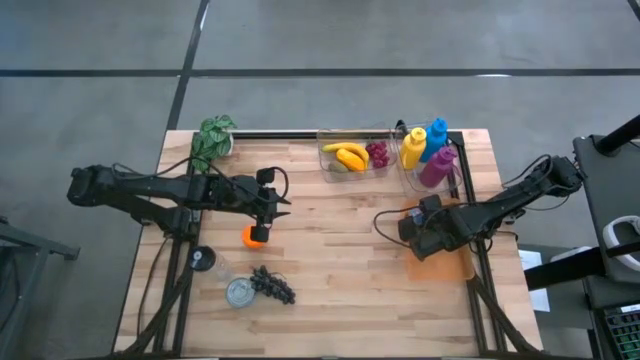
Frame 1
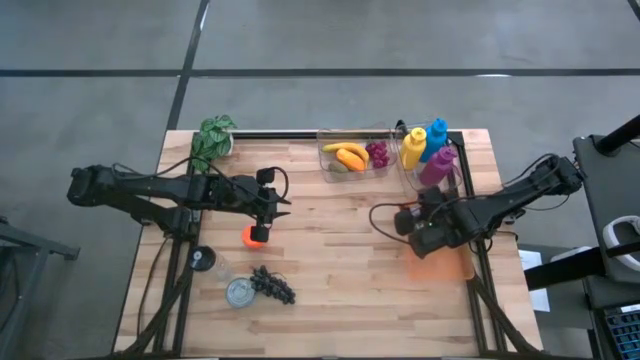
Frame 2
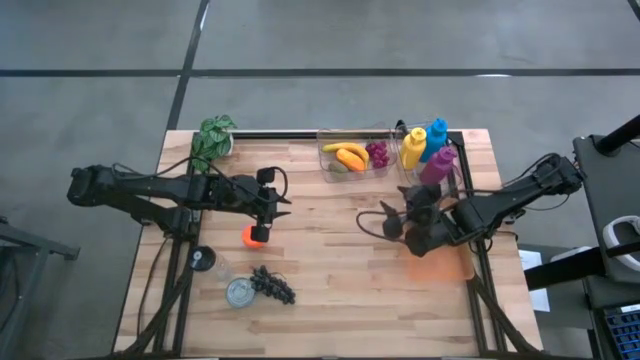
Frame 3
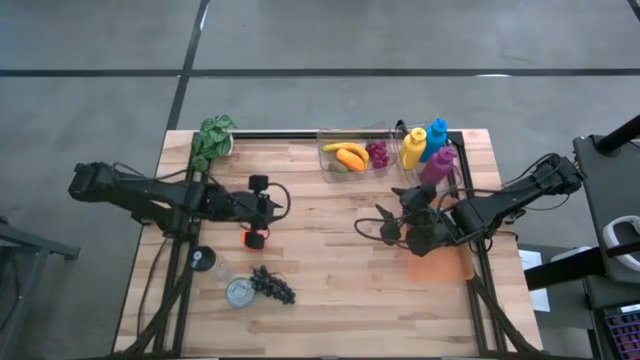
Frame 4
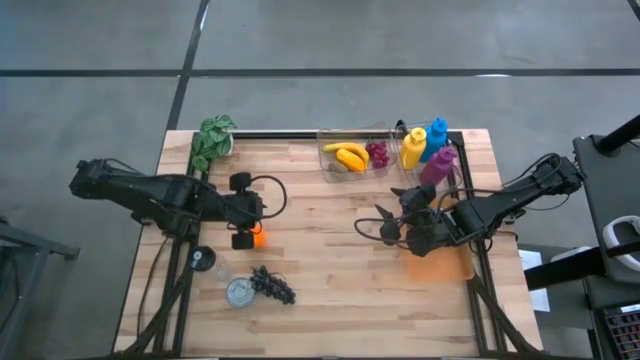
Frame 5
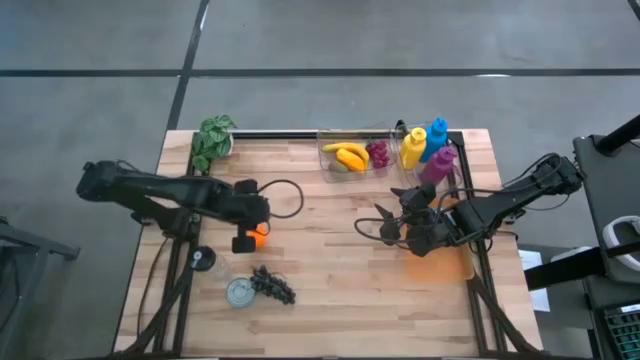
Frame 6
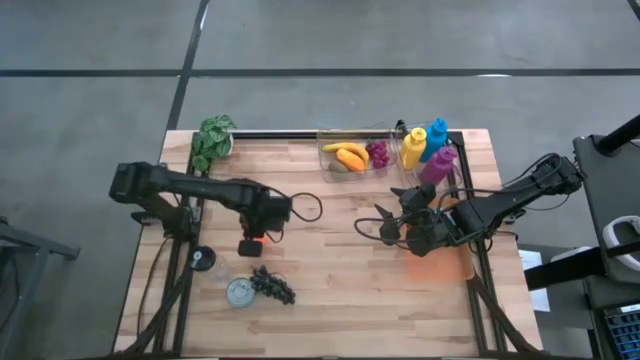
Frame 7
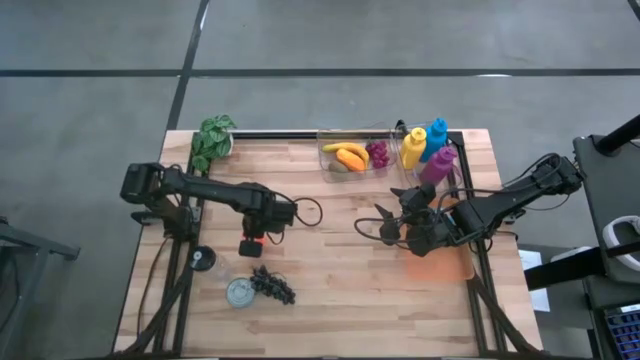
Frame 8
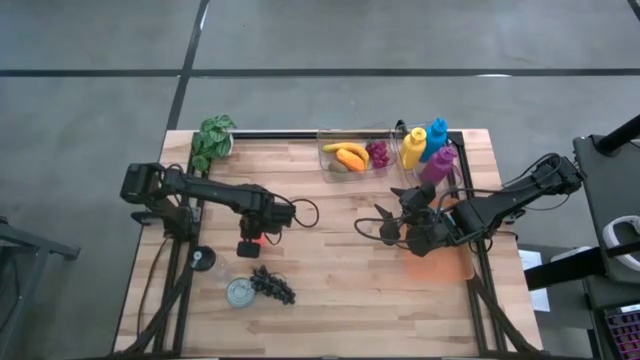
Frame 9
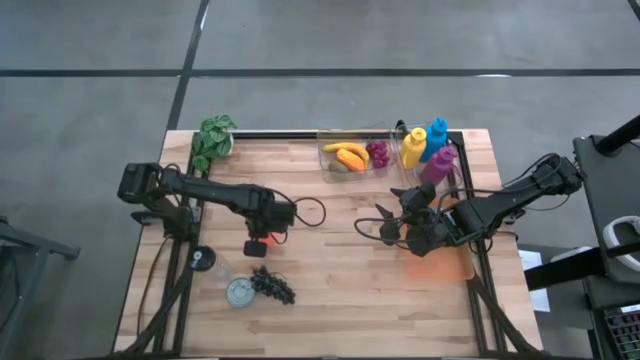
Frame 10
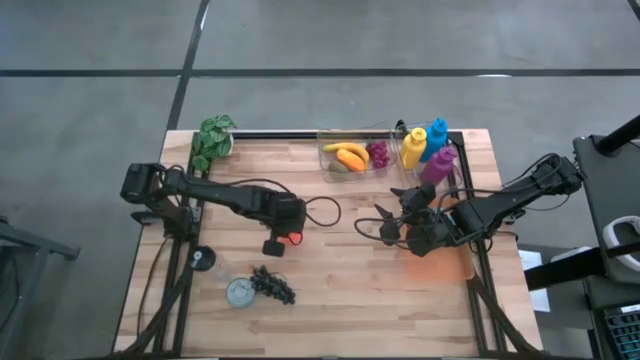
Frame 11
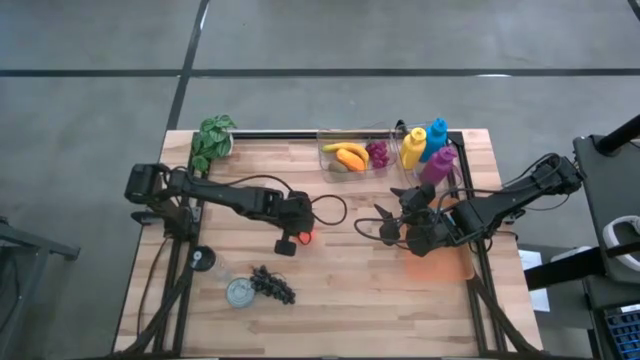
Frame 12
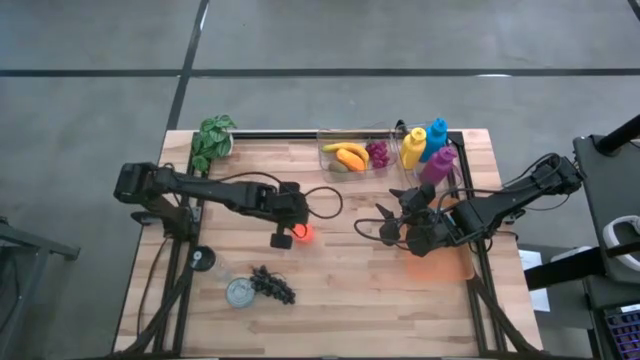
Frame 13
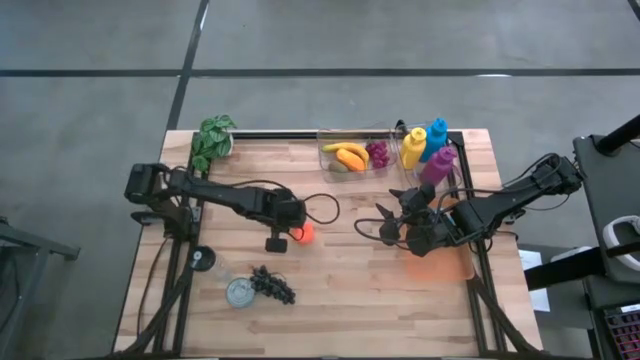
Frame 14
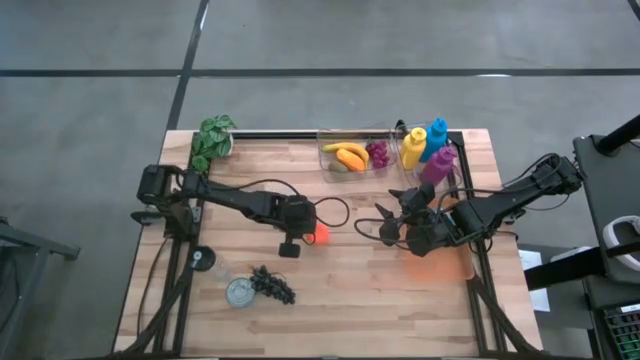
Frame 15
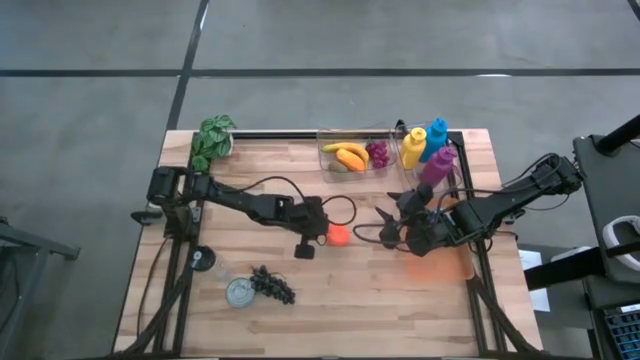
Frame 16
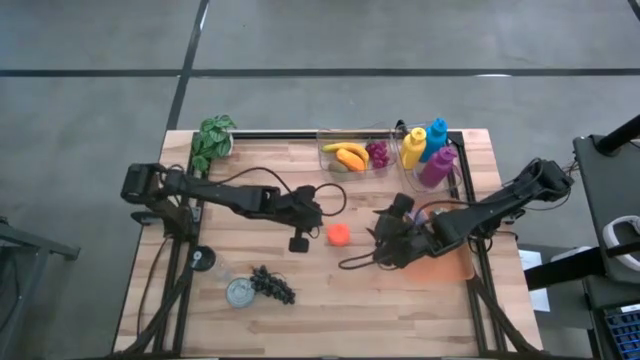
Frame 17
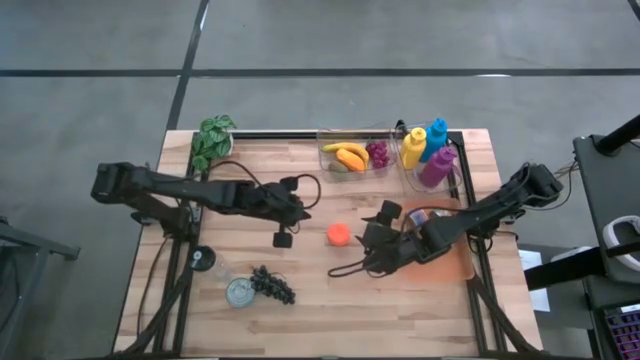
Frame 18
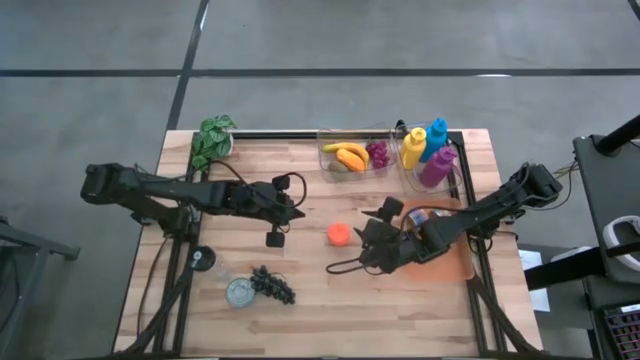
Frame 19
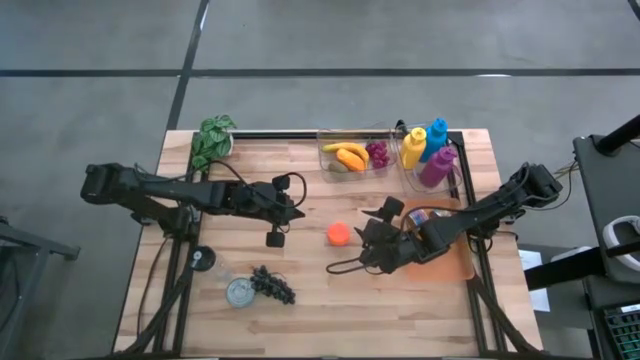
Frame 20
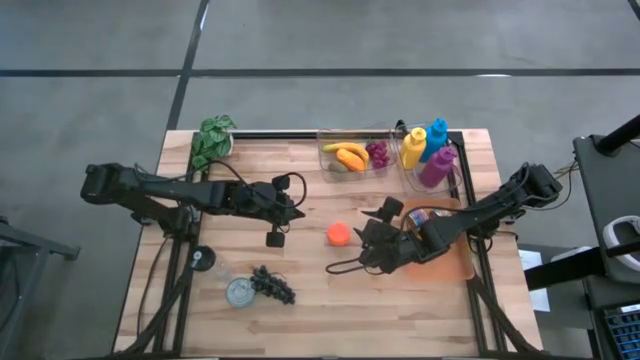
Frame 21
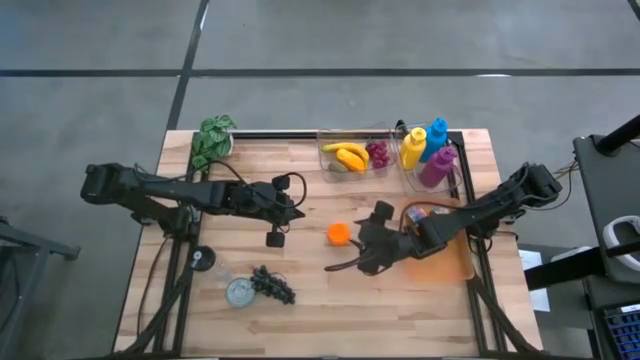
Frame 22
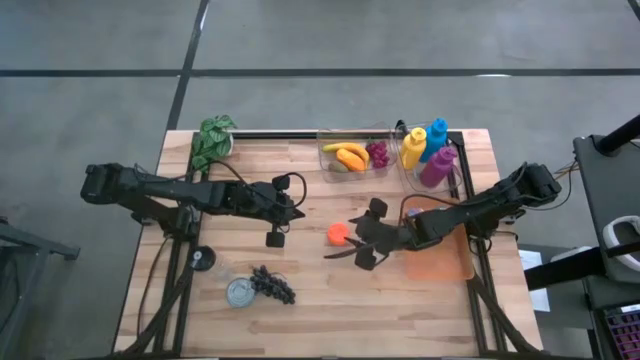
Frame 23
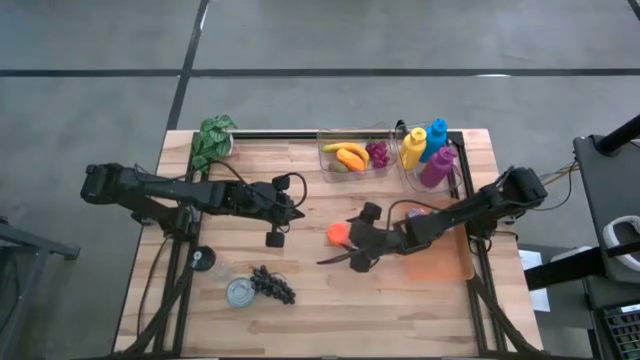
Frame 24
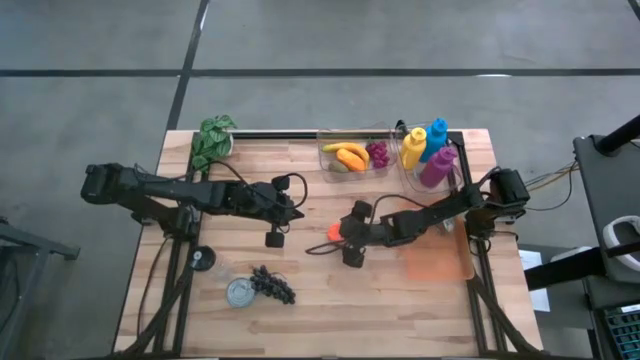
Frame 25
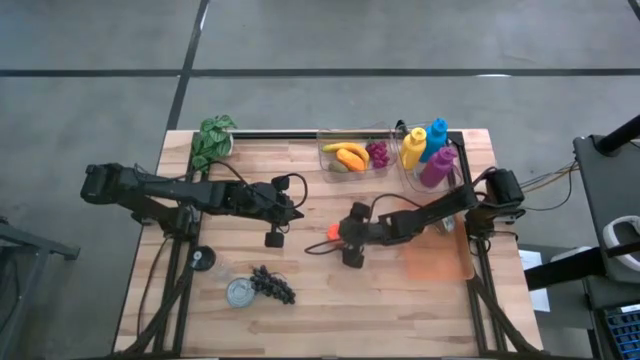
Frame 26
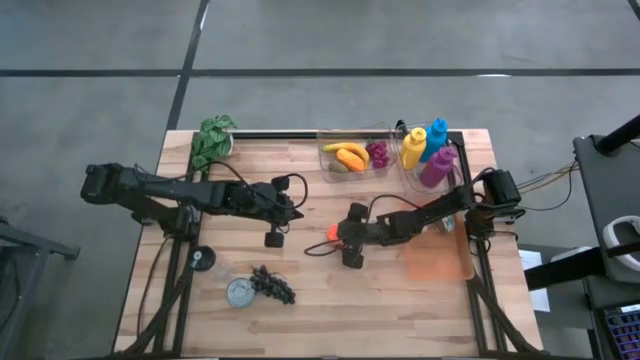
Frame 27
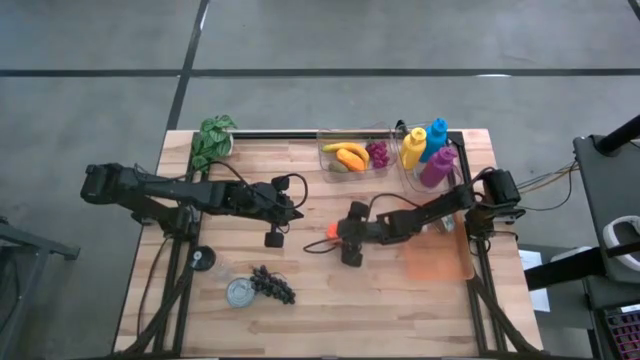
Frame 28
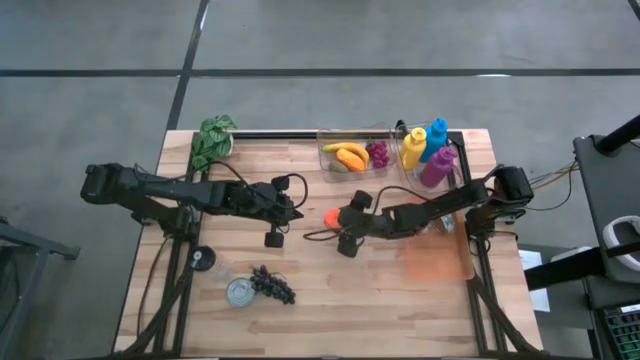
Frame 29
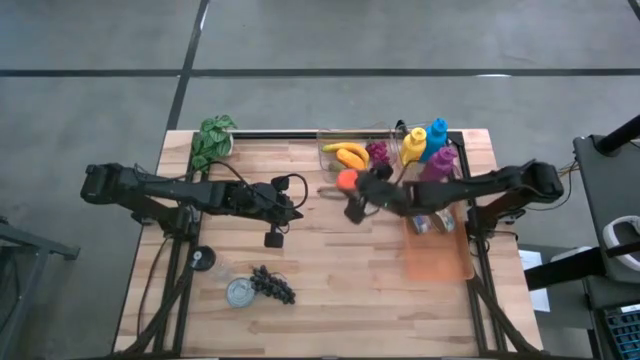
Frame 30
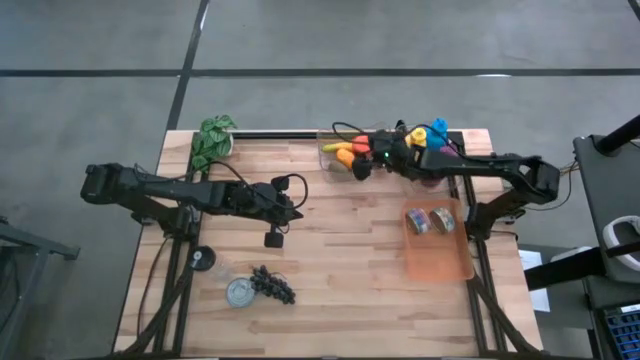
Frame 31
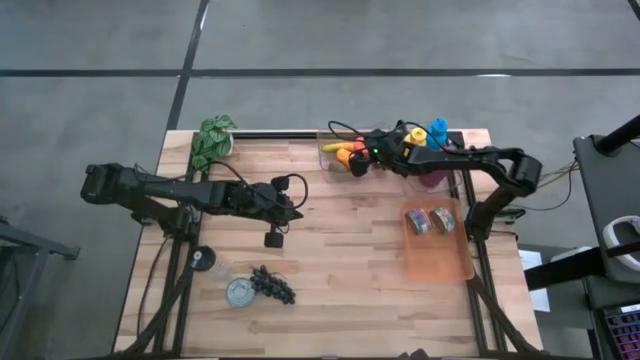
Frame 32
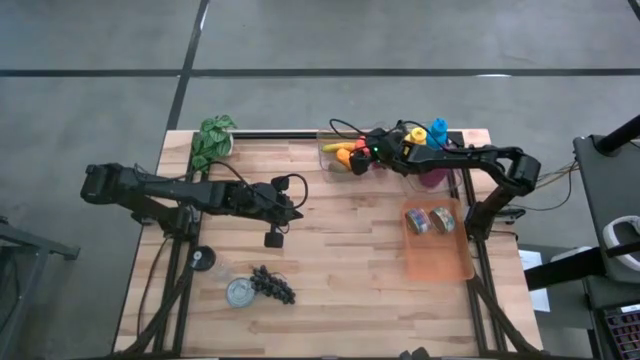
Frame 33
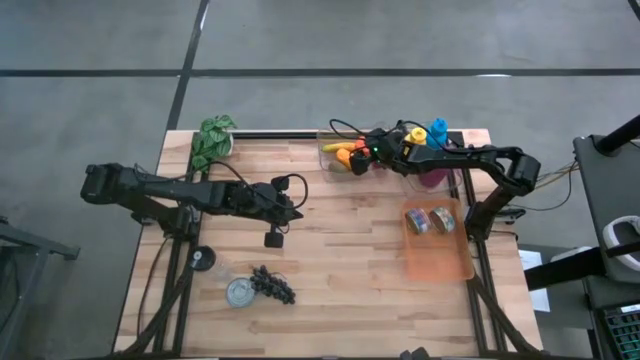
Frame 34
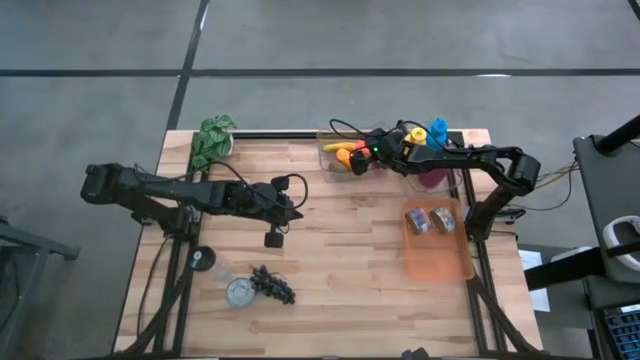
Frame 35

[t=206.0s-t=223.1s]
Task: Pick & Place Food Item
Put the orange into the left transparent bin

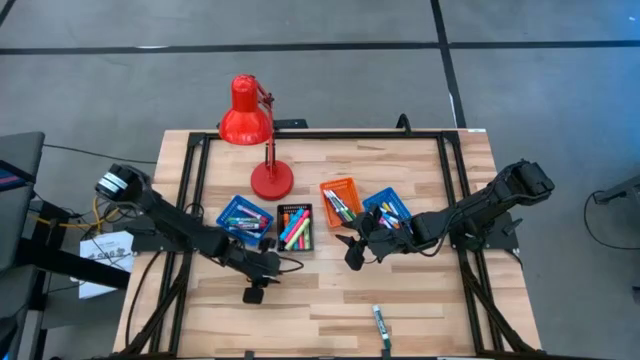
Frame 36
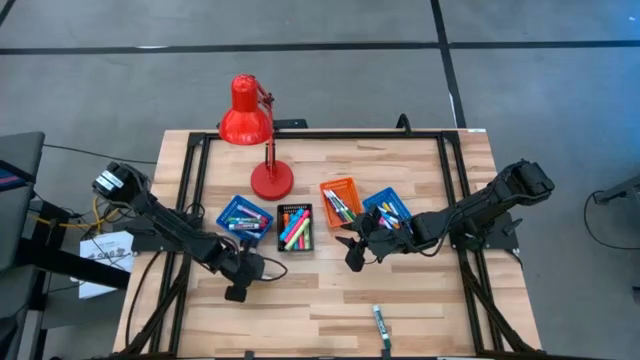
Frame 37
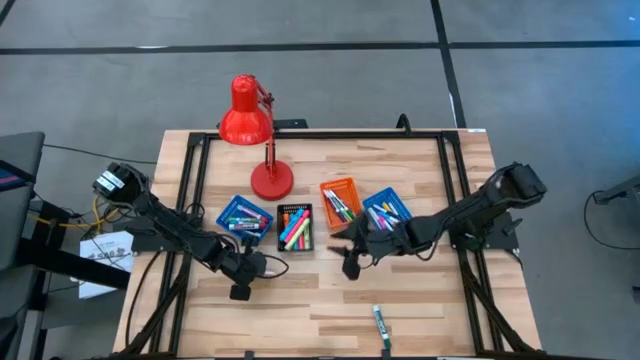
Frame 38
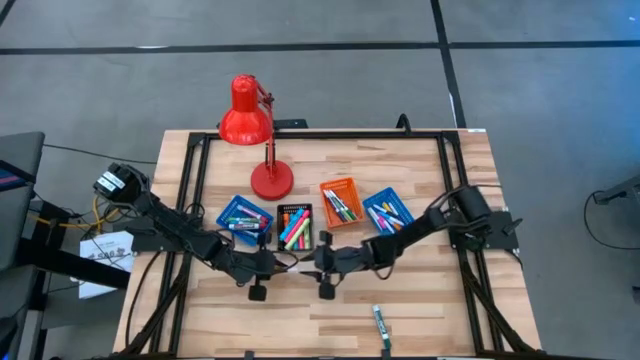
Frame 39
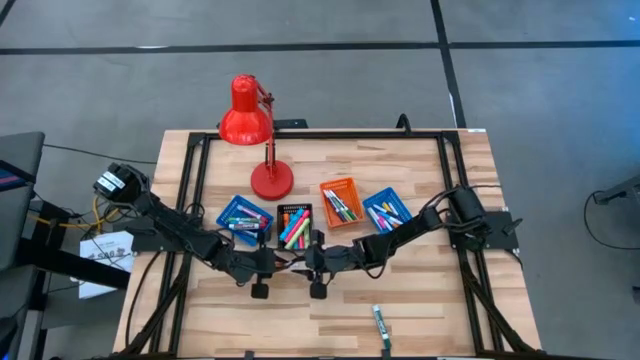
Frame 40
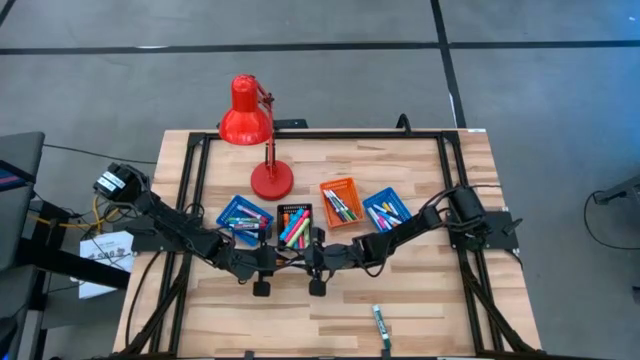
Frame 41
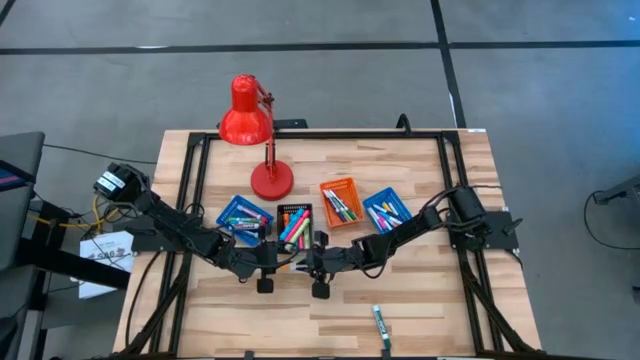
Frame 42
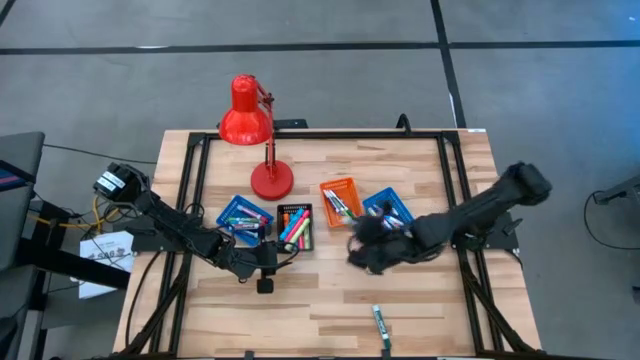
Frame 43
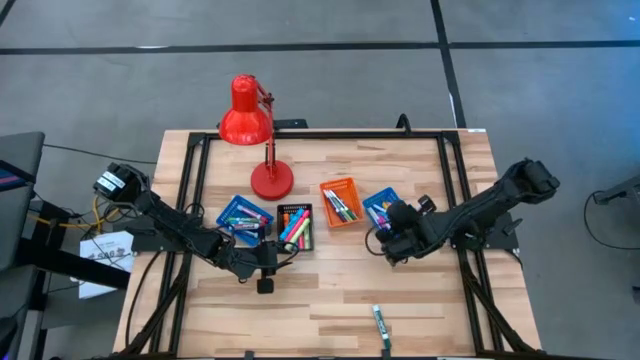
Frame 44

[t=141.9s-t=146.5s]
Task: Pick & Place Markers
Put the small white and orange highlighter pen into the right blue basket
